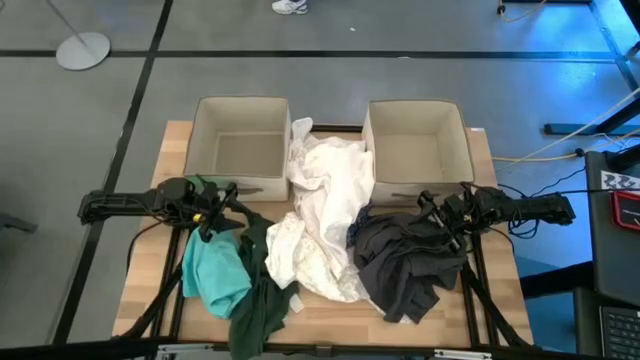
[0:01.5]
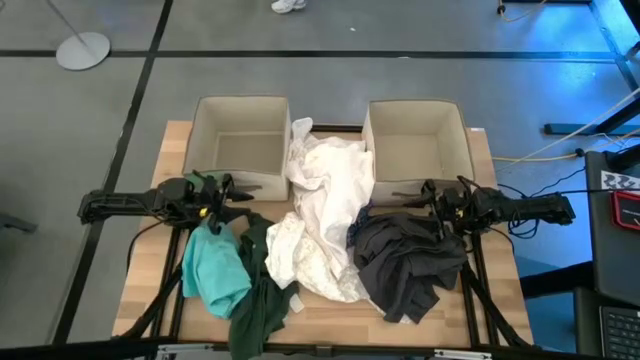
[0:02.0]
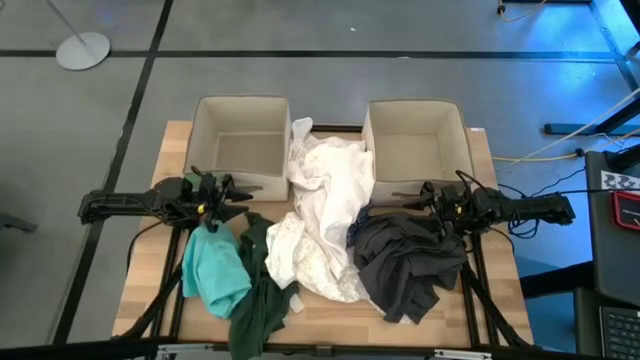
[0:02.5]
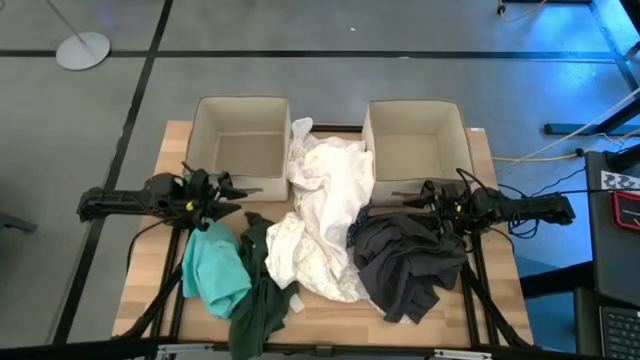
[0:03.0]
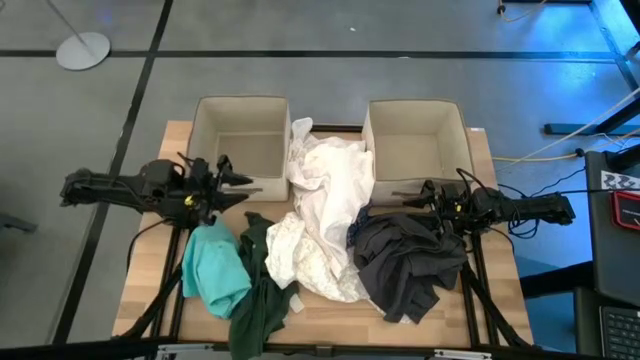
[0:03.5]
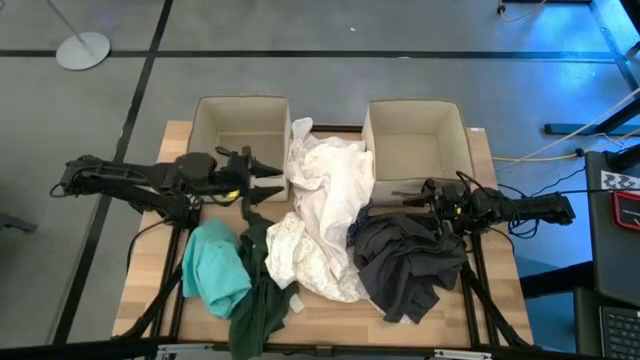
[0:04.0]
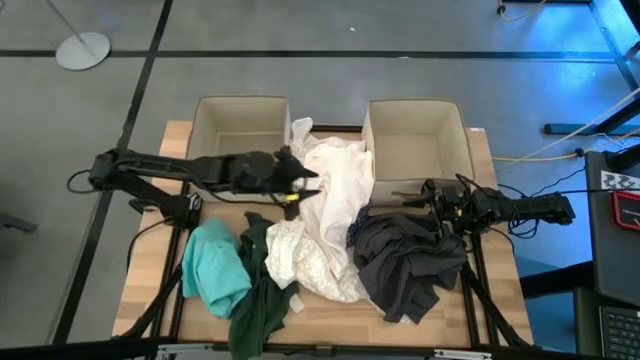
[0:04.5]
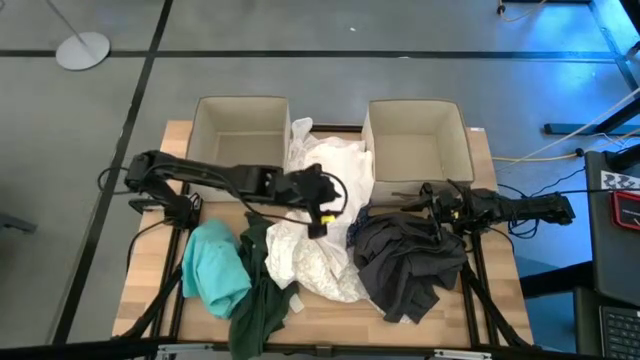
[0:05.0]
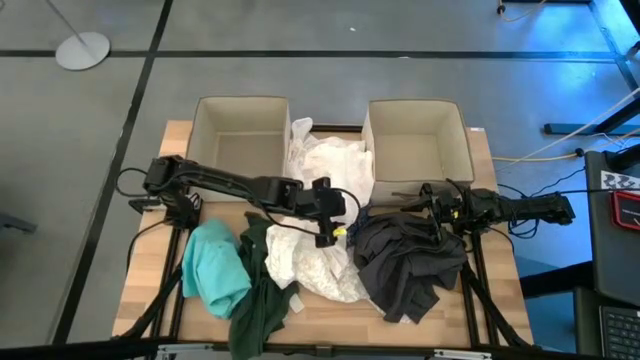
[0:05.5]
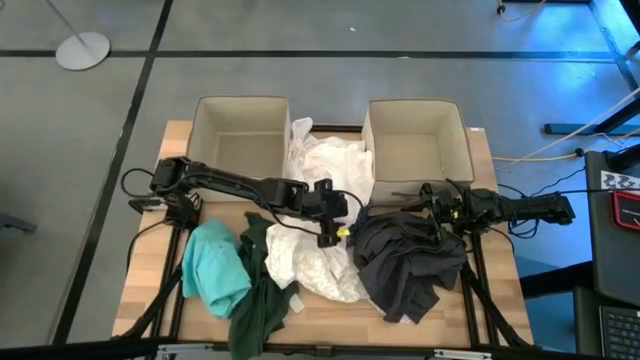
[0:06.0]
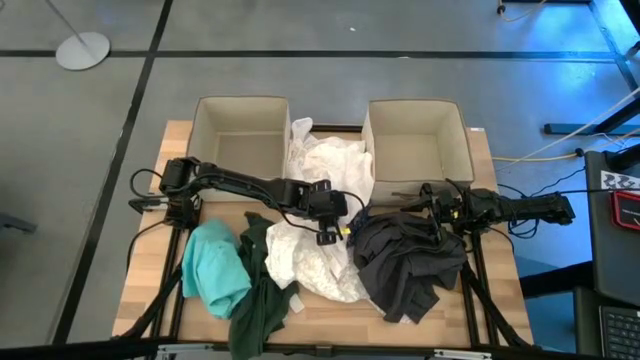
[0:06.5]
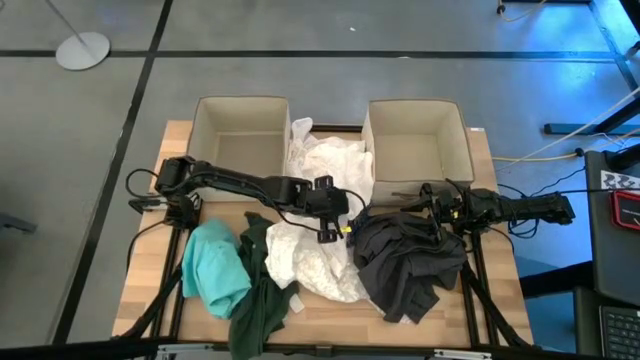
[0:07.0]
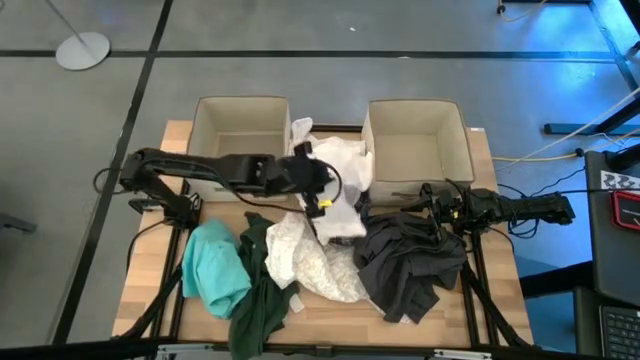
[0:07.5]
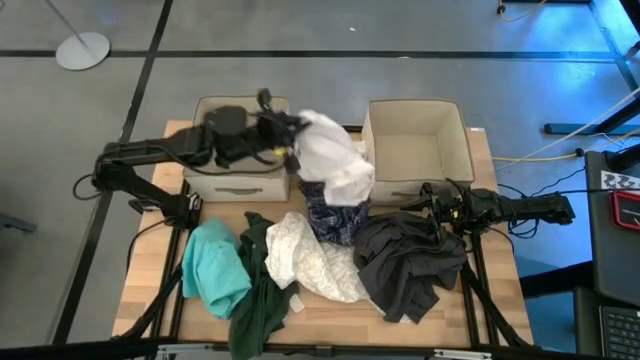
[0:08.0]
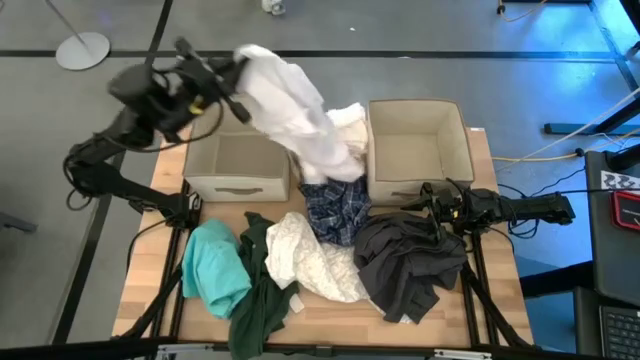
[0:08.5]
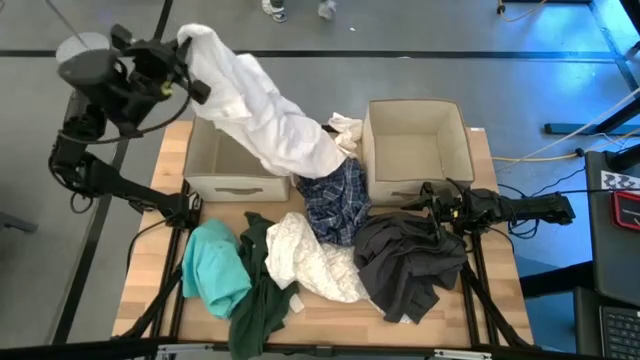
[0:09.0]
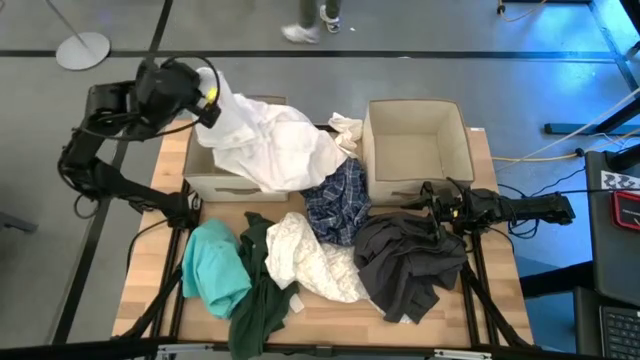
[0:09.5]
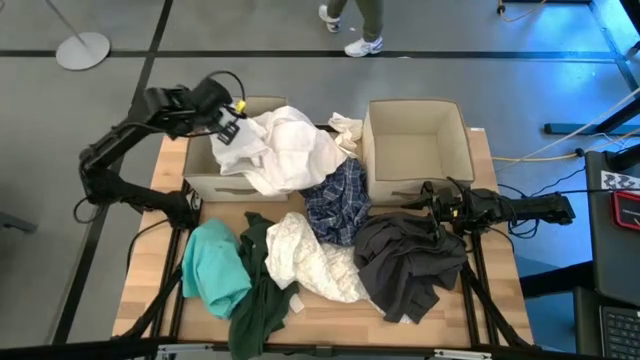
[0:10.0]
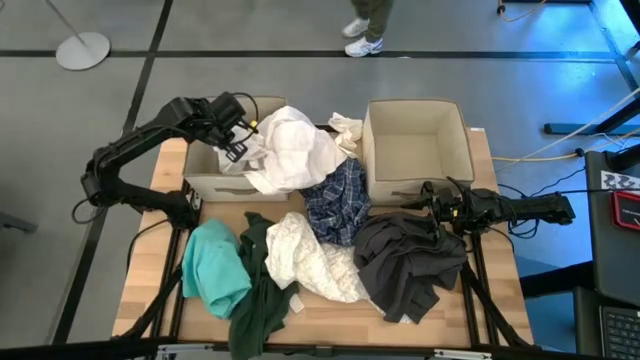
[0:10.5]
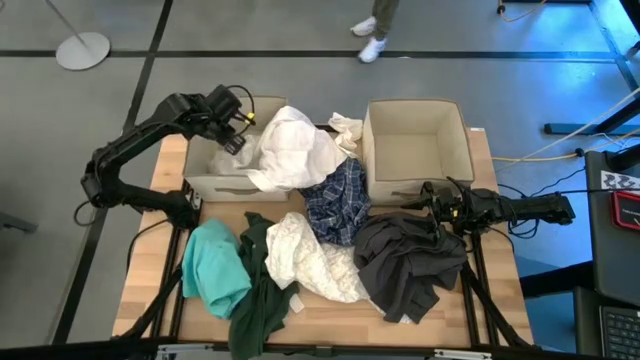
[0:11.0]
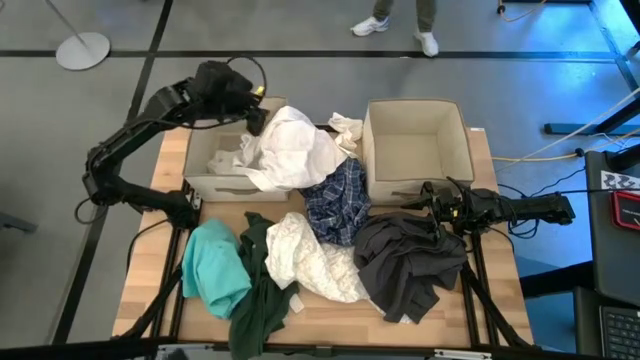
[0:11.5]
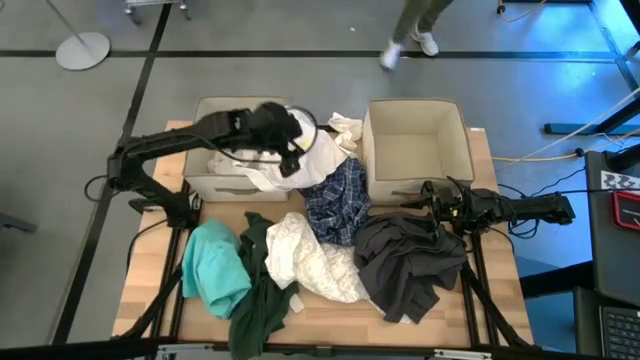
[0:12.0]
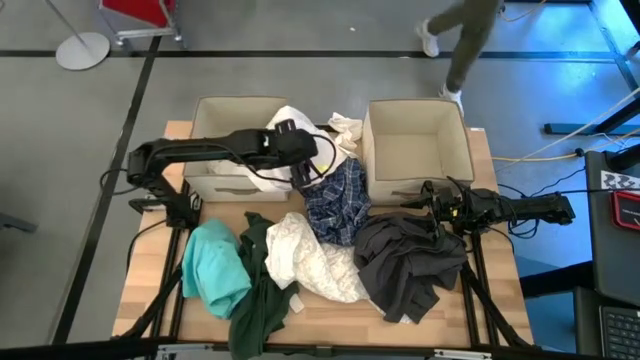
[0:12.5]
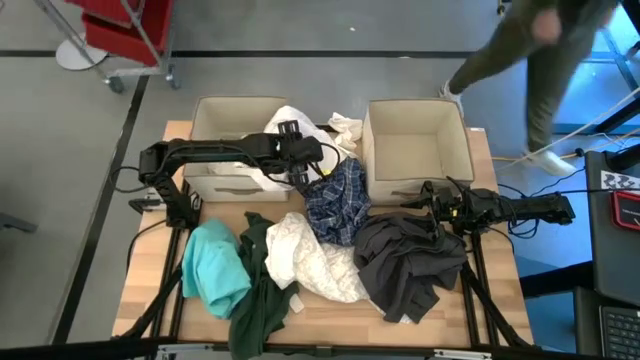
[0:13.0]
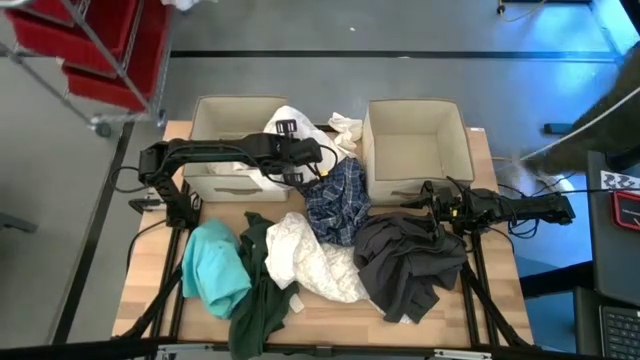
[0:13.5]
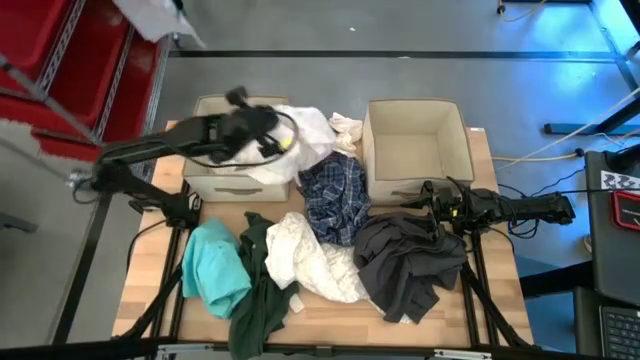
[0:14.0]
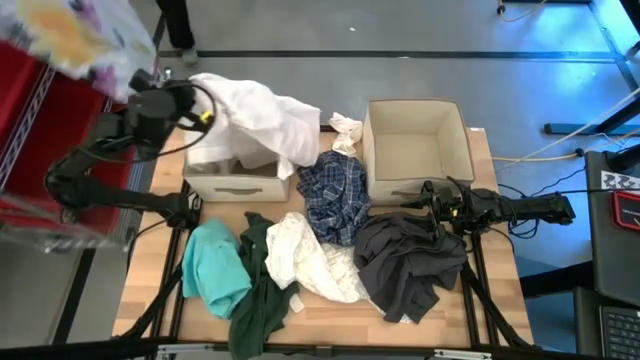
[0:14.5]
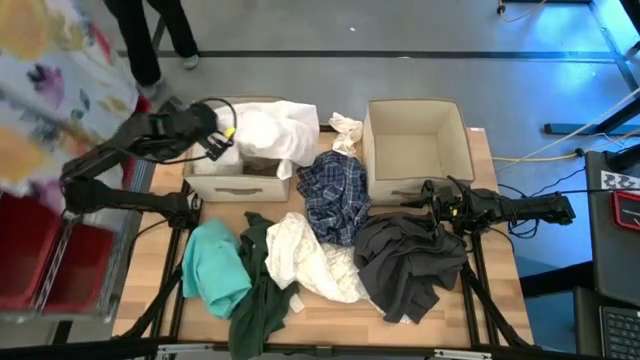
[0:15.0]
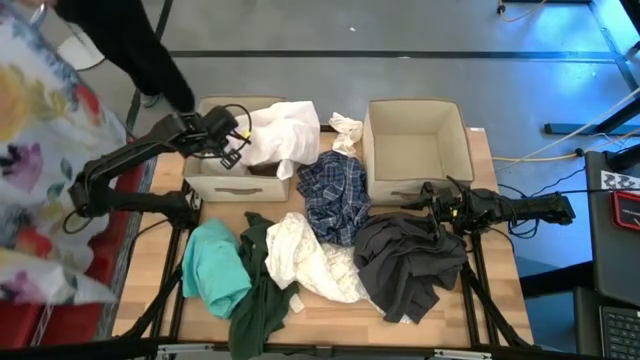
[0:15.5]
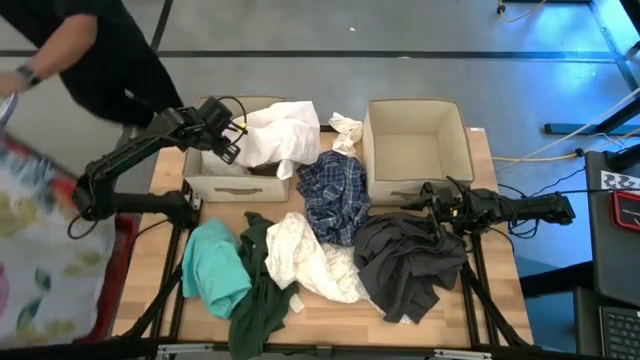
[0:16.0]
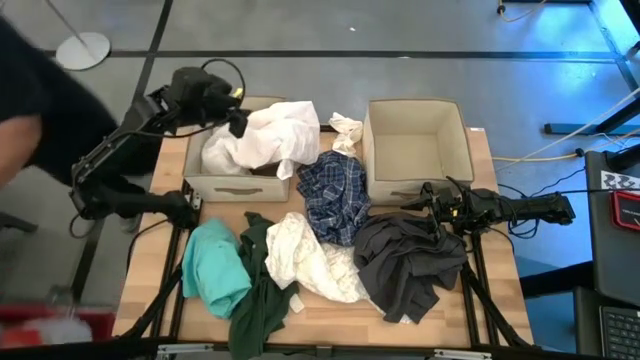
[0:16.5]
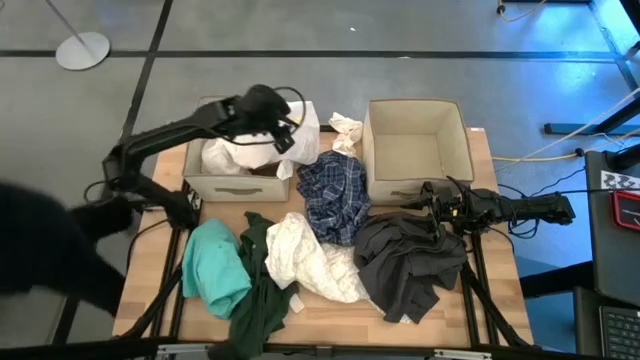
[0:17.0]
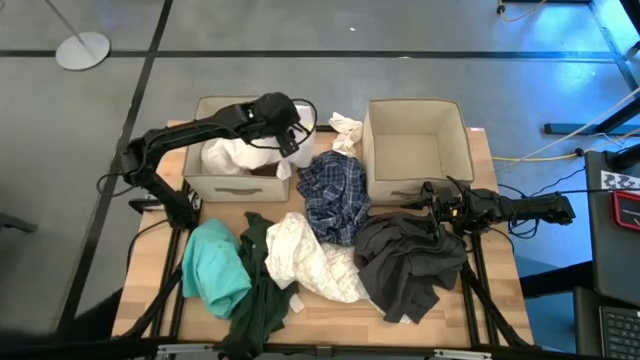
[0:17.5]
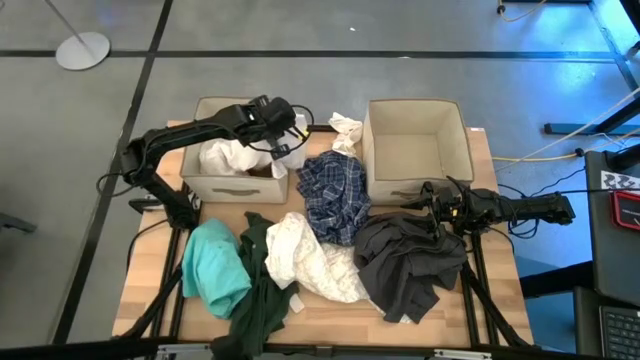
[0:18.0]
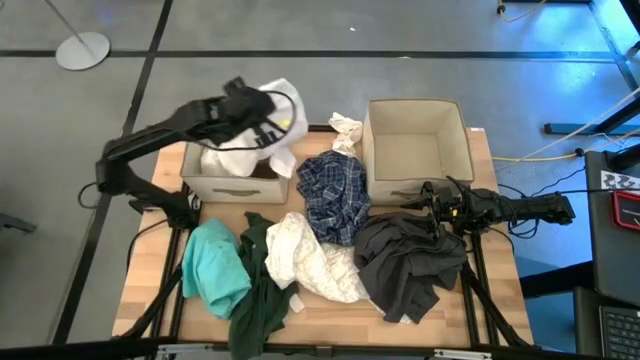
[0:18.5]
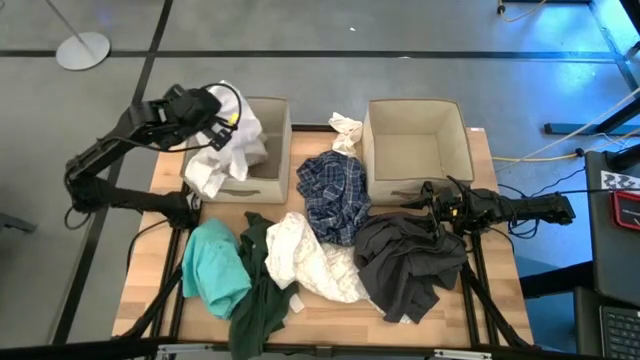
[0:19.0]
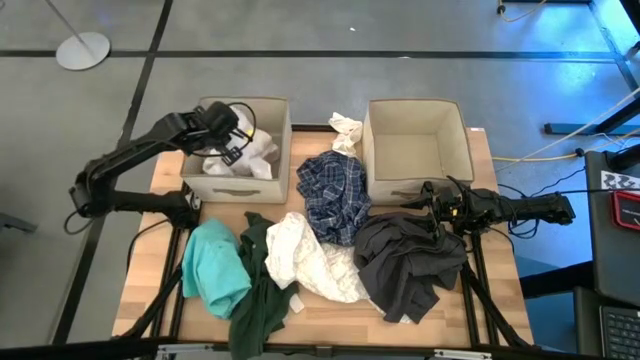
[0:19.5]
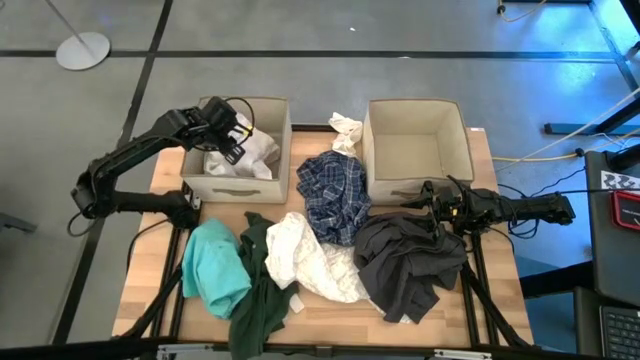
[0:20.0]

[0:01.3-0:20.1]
Task: Sort clothes
Put the white shirt into the left brown bin
